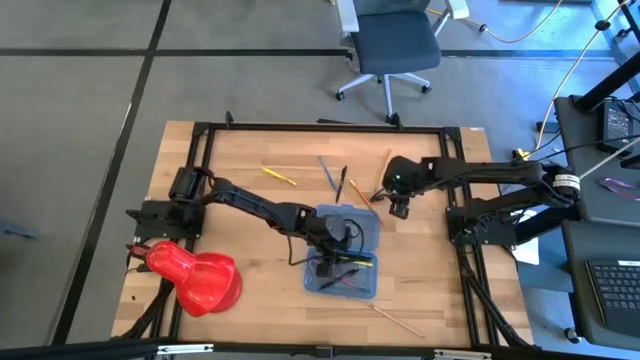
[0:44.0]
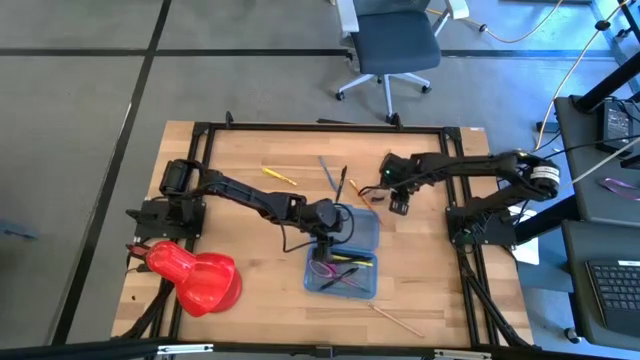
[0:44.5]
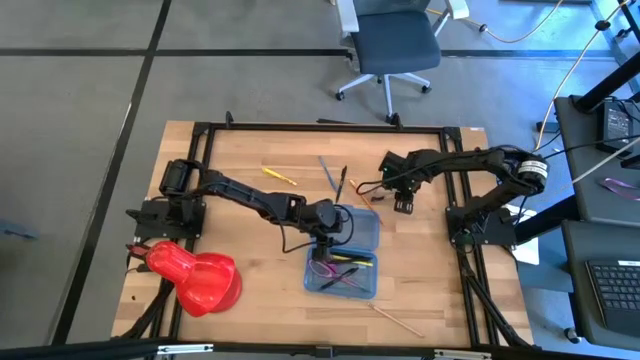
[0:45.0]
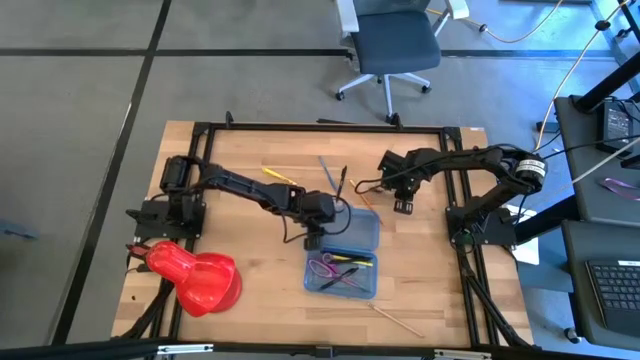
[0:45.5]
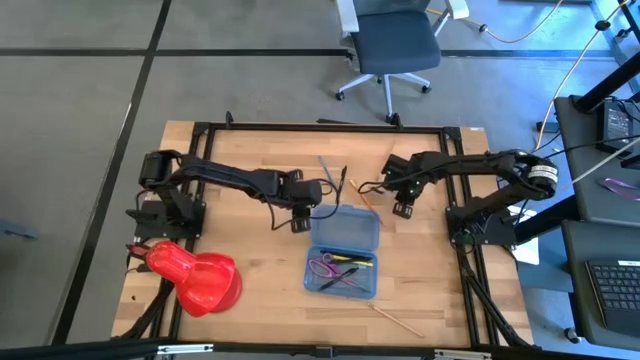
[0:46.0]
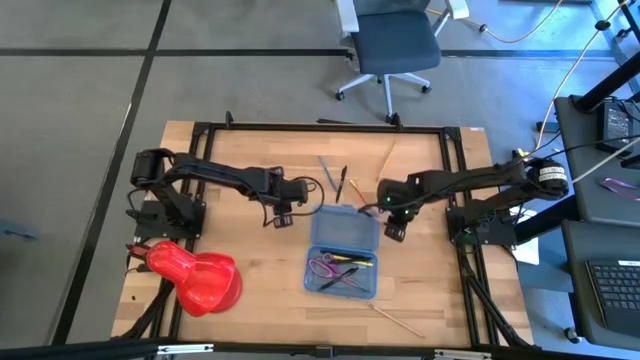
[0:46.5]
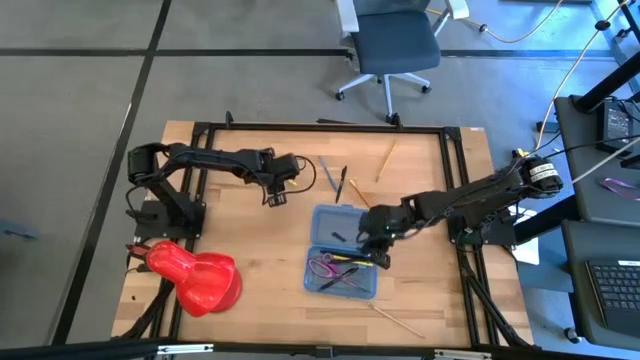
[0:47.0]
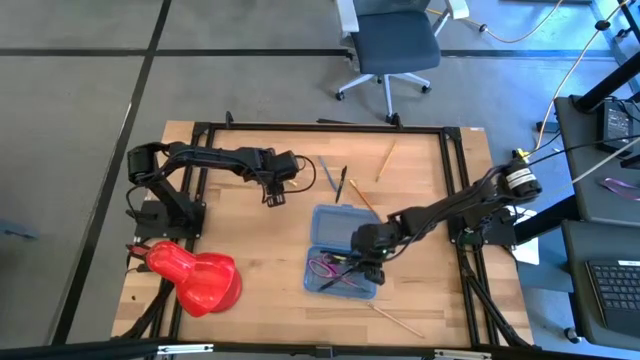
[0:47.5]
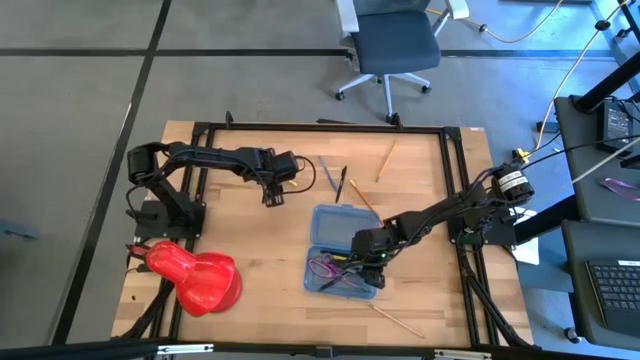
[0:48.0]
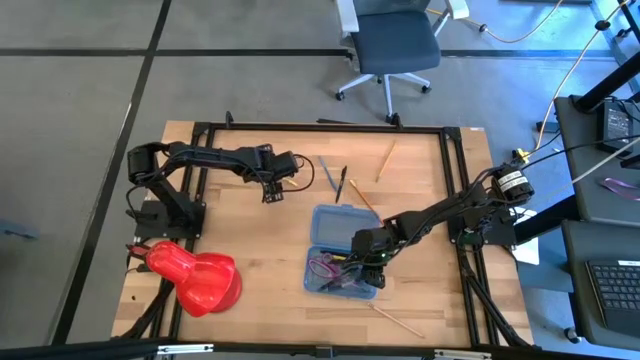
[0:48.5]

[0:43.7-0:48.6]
Task: Pick & place school supplies into a supply box
Put the top right black pen into the blue supply box

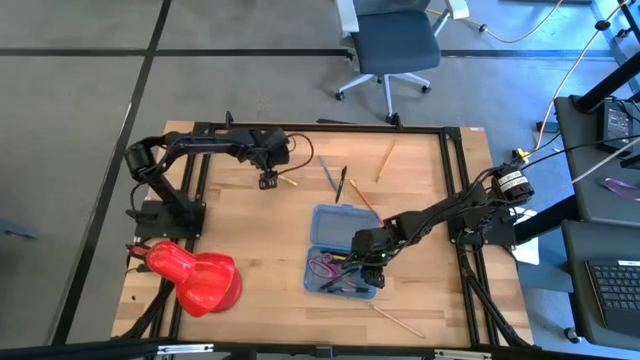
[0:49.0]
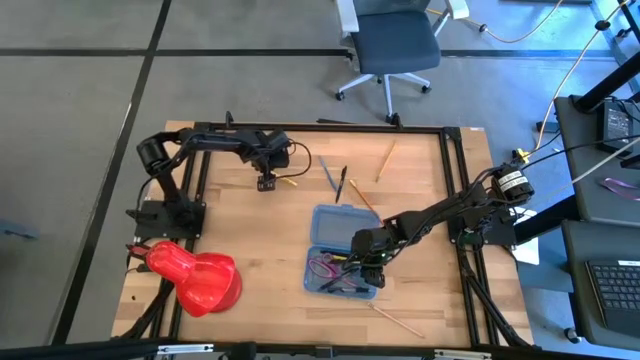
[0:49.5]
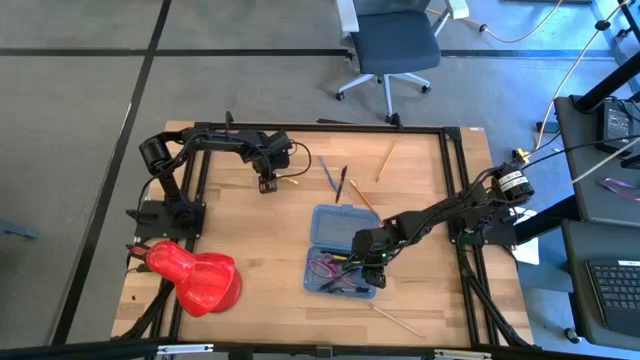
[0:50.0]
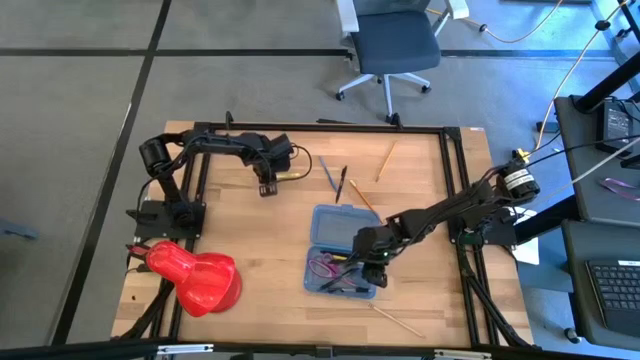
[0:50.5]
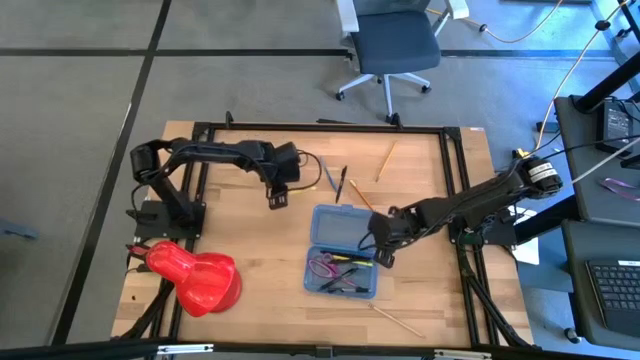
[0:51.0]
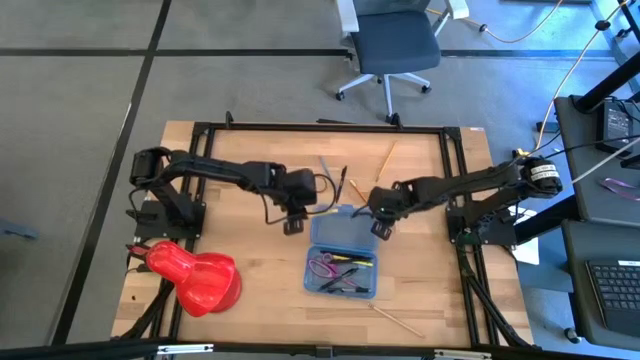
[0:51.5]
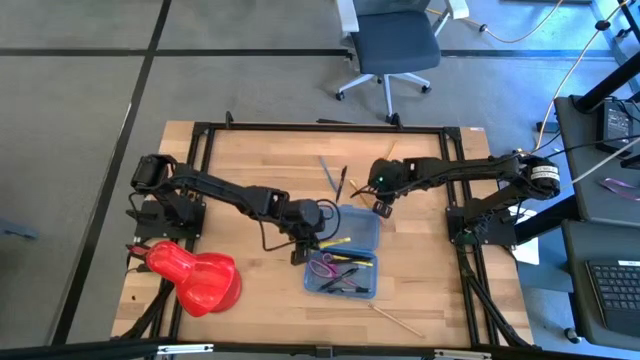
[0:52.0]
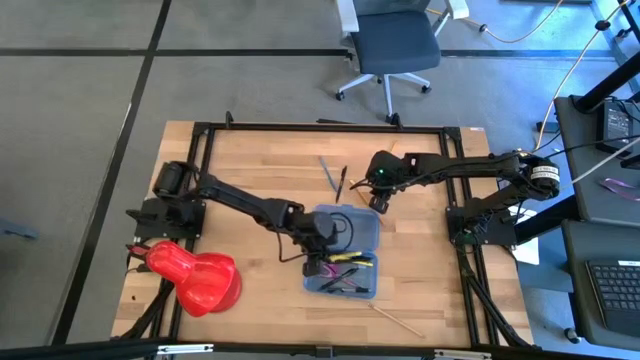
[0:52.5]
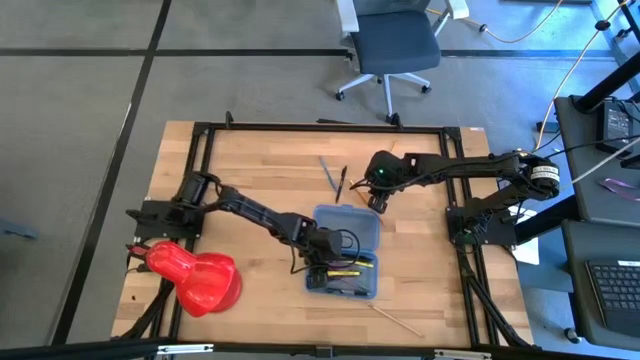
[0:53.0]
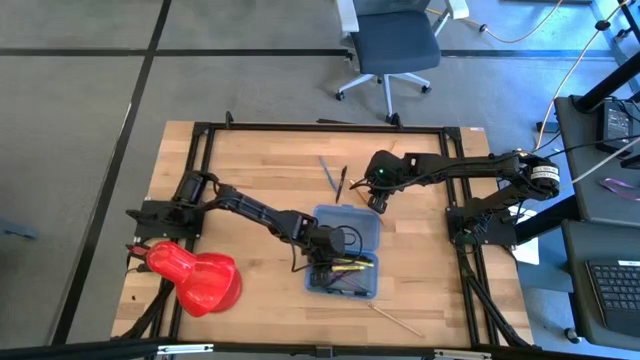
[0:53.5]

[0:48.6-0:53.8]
Put the top left yellow pen into the blue supply box

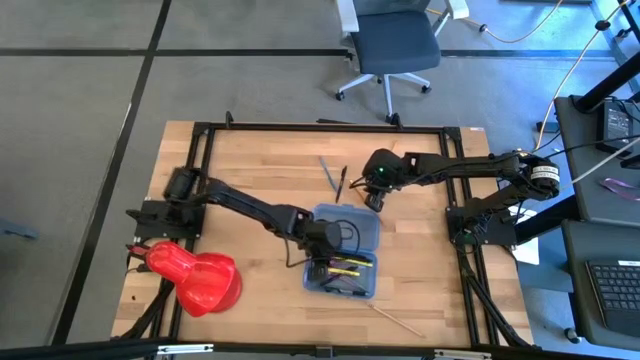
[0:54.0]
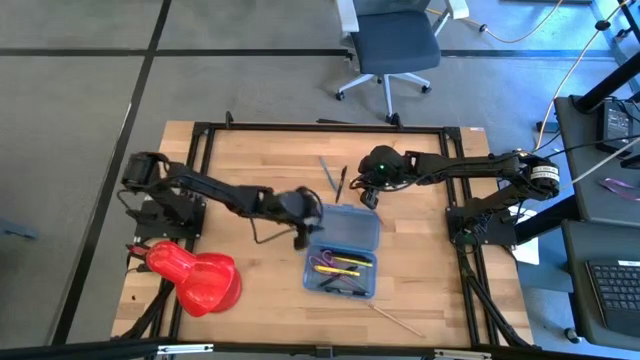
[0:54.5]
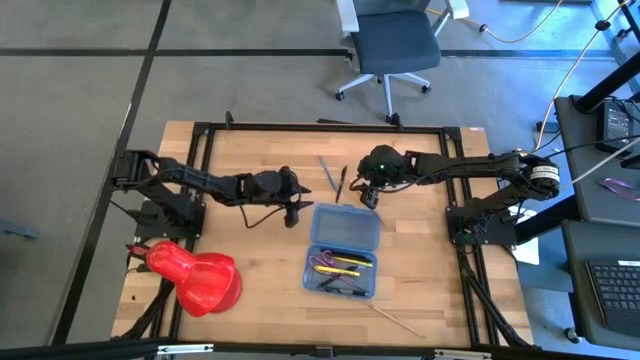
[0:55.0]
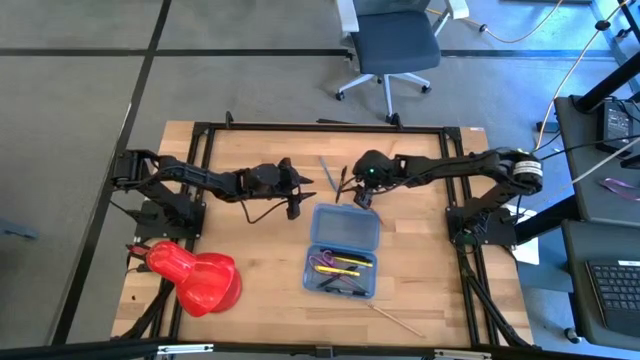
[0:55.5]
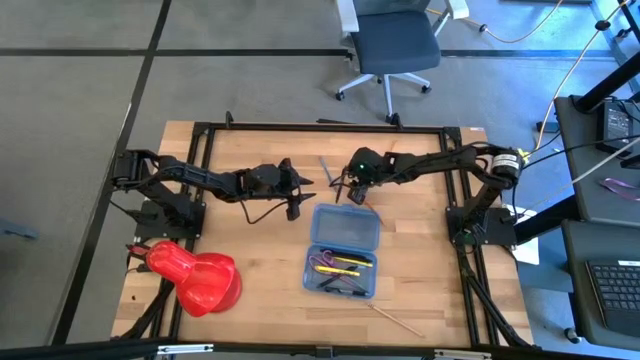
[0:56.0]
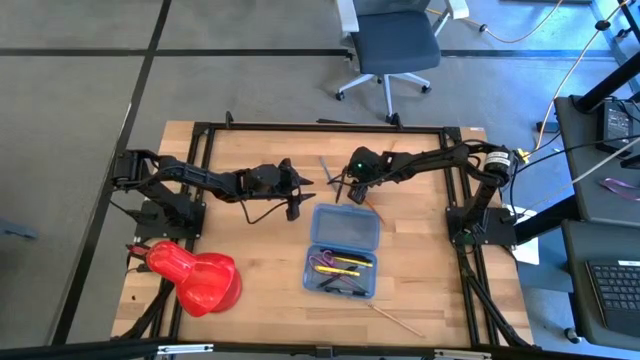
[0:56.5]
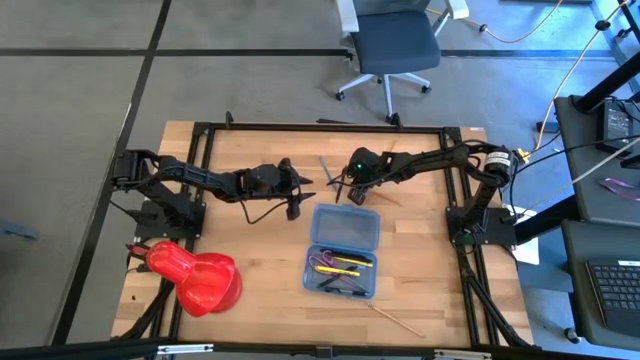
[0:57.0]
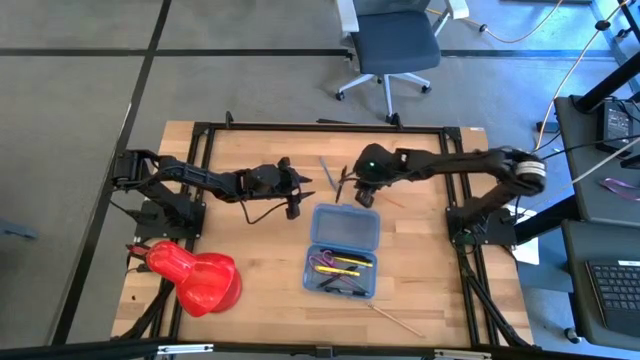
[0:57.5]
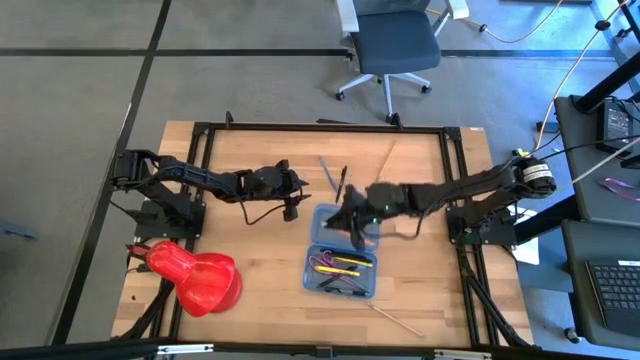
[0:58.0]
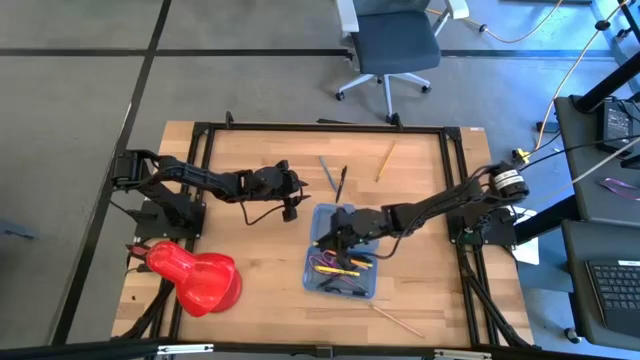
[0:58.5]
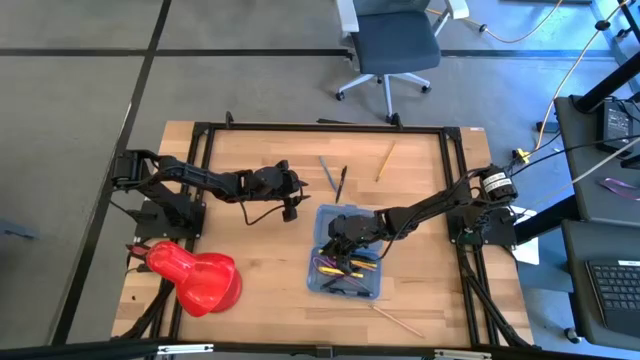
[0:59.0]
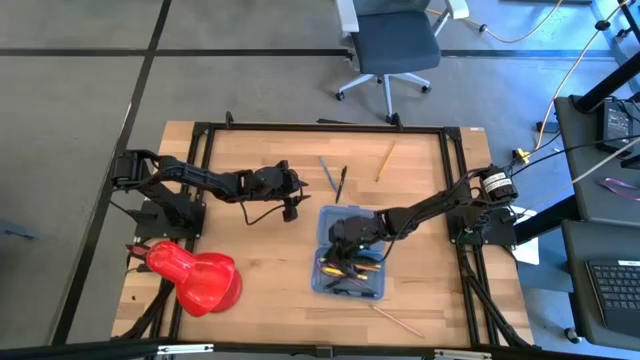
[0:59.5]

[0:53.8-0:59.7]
Put the top yellow pencil into the blue supply box

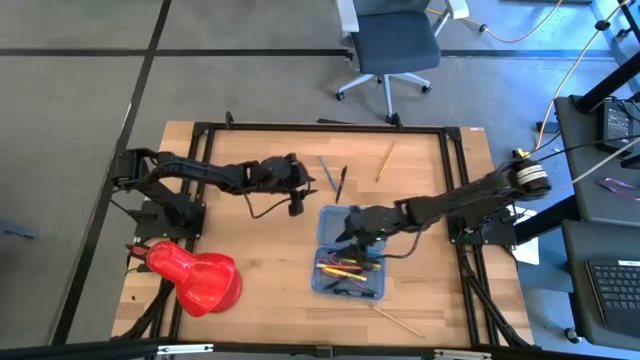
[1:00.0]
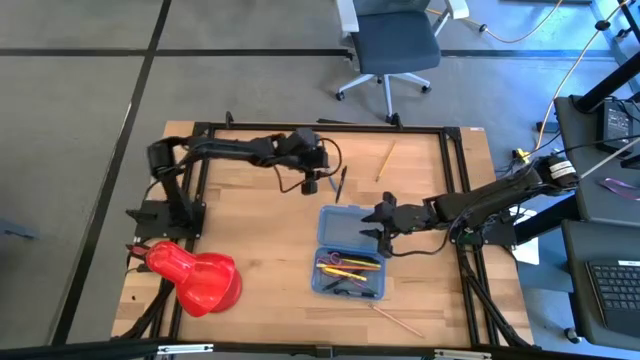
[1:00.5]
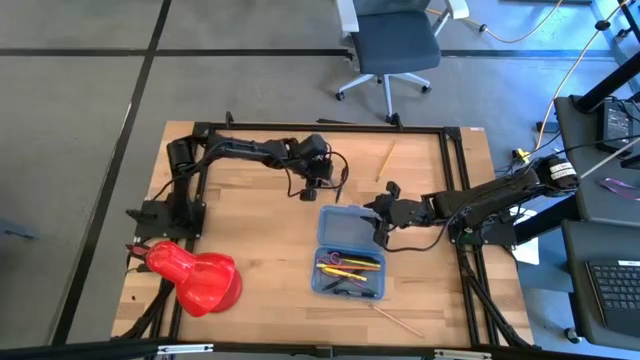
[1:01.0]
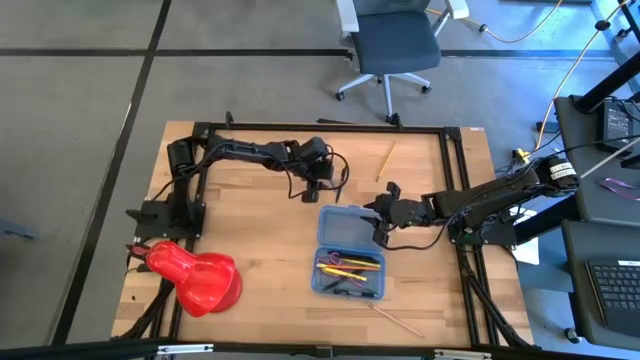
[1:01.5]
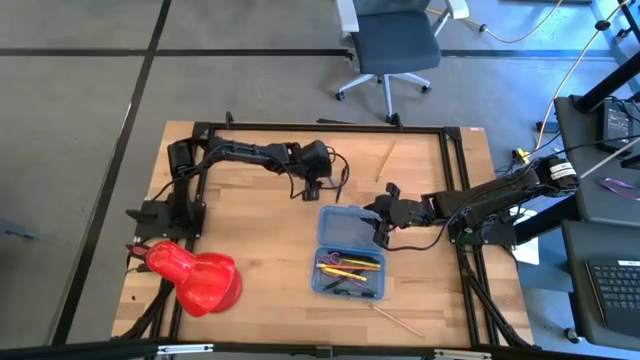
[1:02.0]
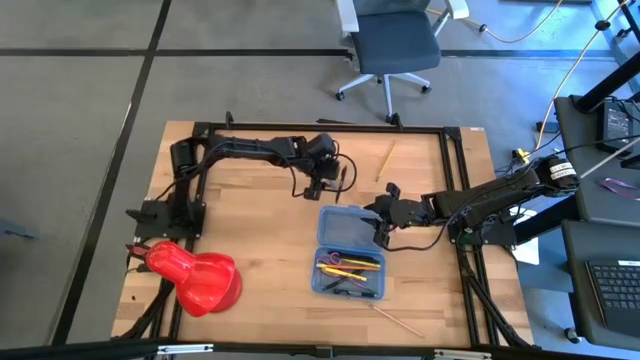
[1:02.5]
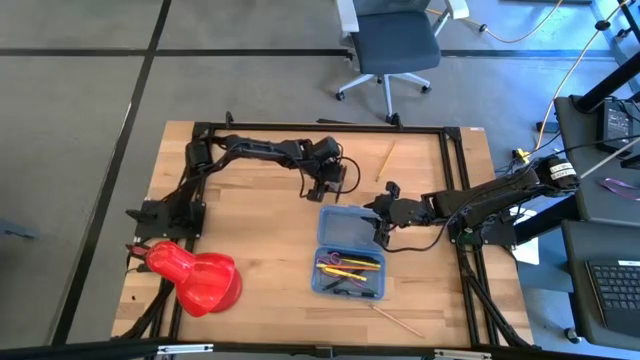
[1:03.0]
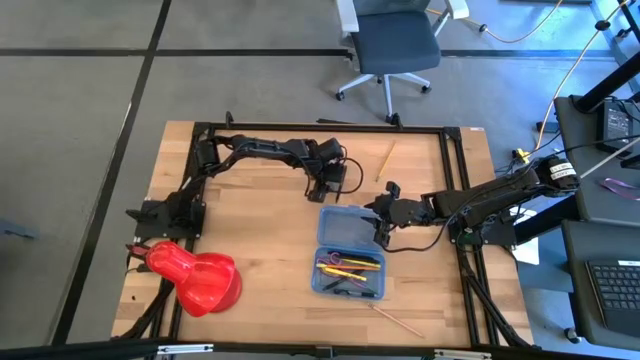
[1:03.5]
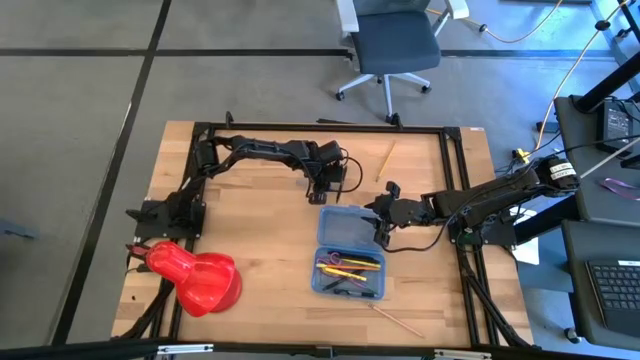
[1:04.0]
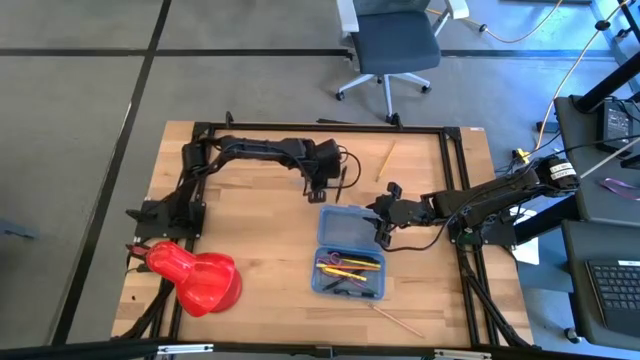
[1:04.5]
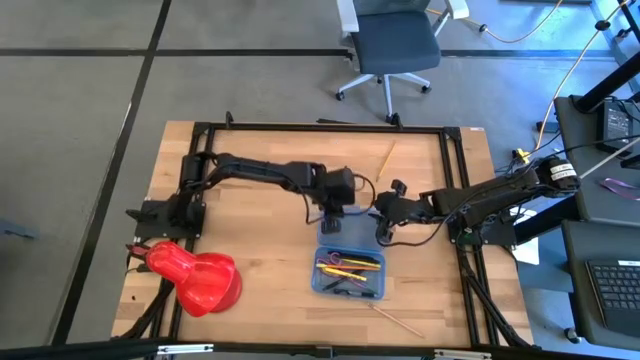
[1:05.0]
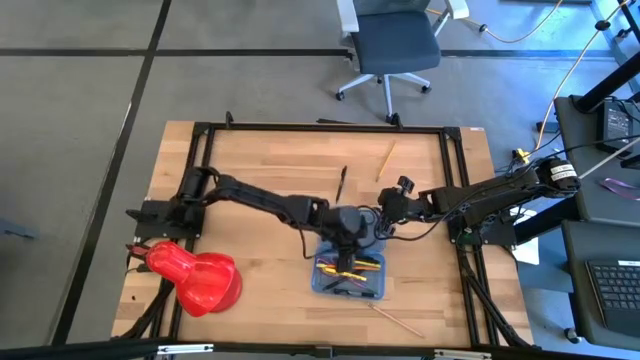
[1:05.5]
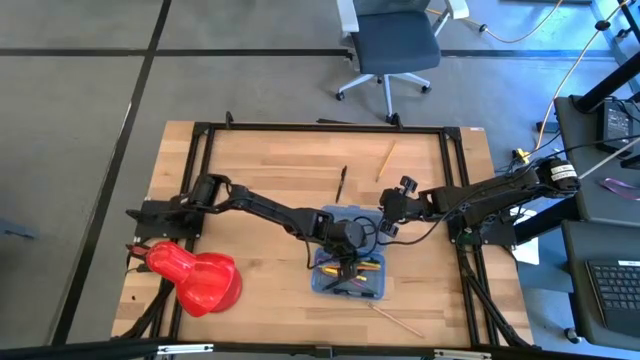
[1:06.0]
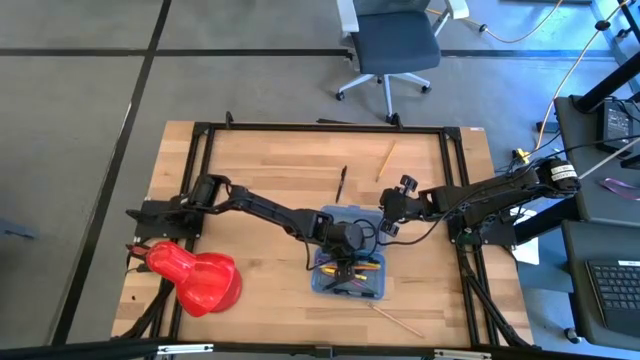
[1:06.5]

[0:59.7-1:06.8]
Put the top blue pen into the blue supply box
